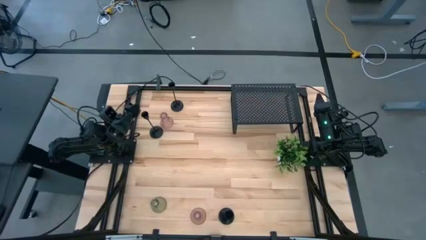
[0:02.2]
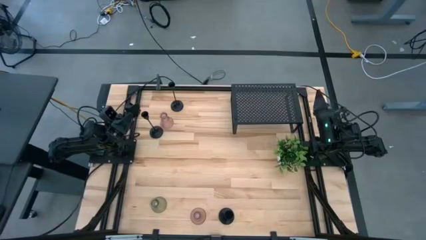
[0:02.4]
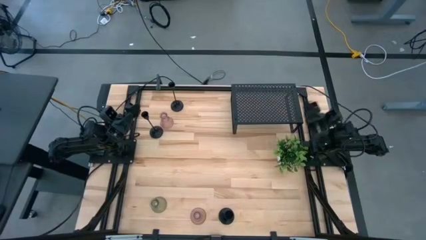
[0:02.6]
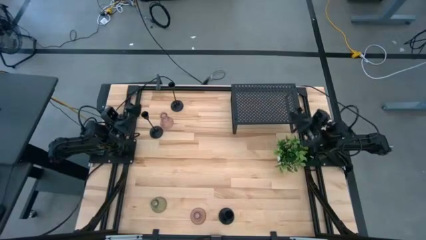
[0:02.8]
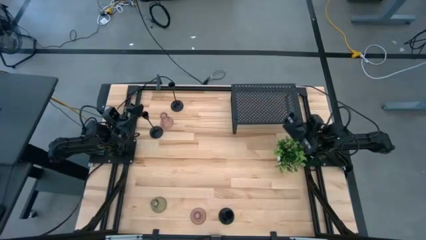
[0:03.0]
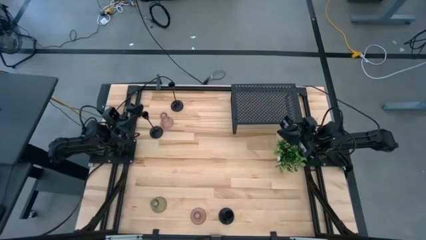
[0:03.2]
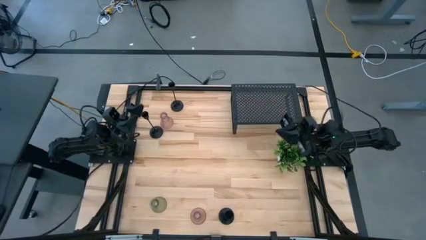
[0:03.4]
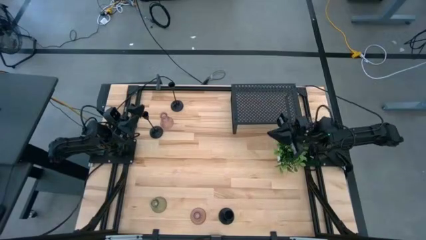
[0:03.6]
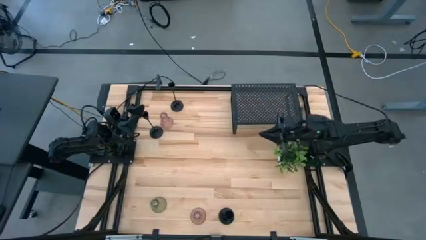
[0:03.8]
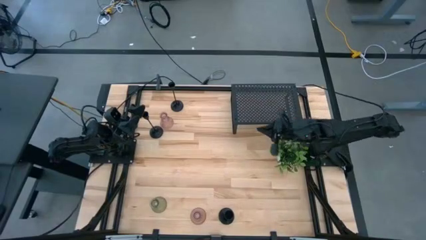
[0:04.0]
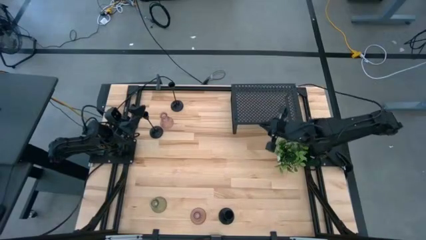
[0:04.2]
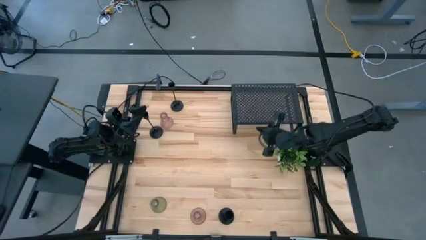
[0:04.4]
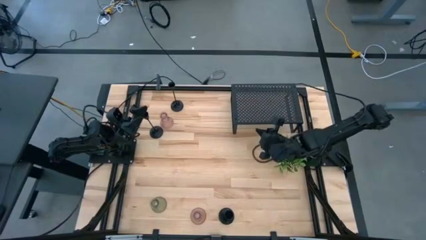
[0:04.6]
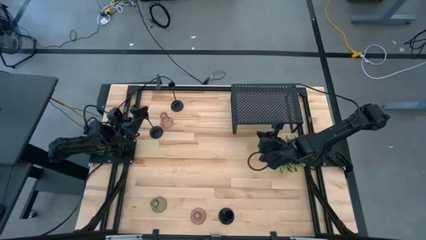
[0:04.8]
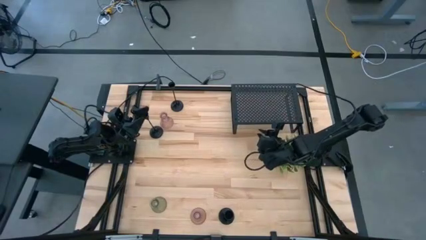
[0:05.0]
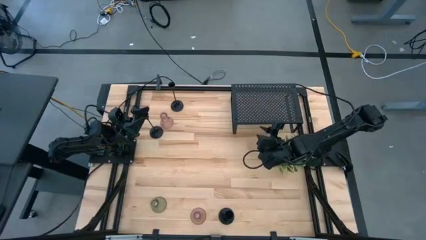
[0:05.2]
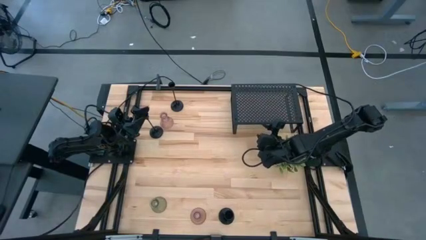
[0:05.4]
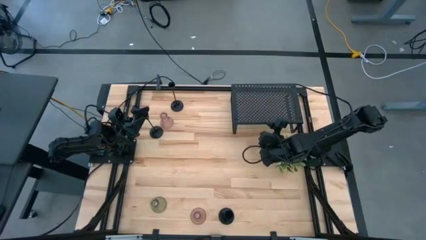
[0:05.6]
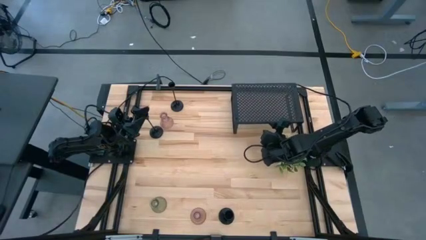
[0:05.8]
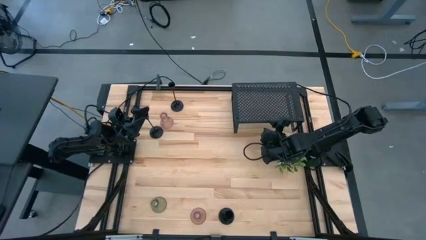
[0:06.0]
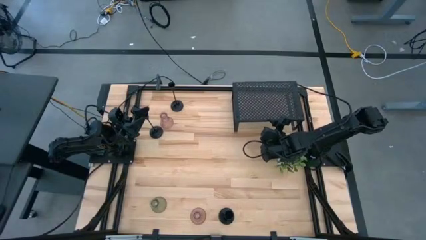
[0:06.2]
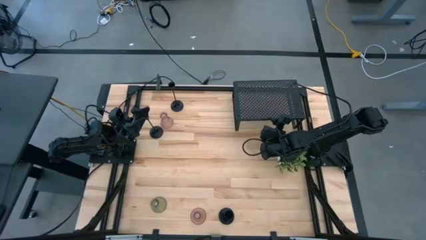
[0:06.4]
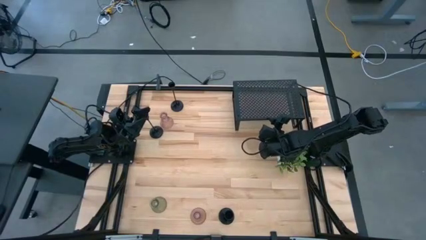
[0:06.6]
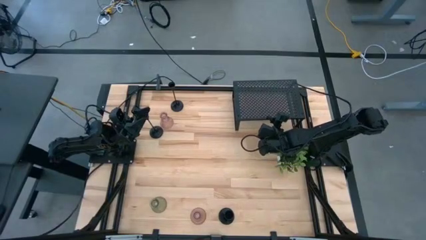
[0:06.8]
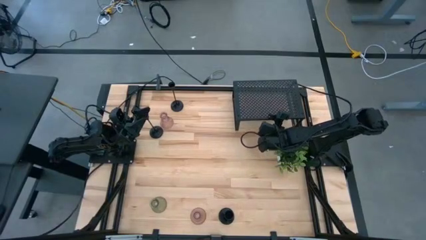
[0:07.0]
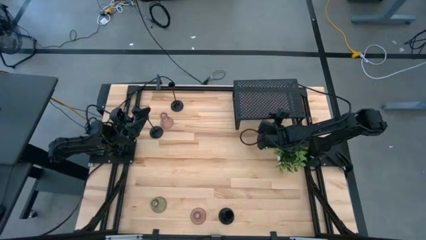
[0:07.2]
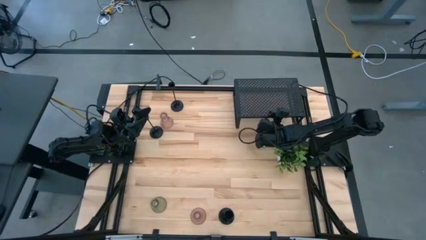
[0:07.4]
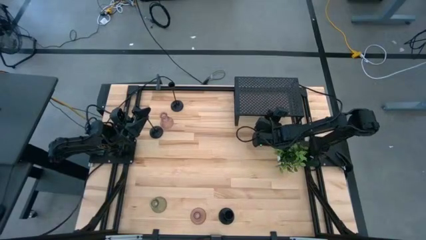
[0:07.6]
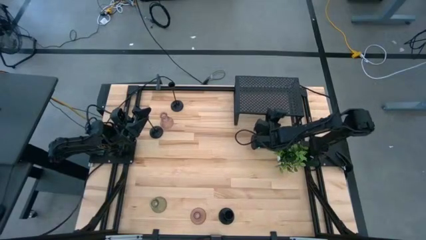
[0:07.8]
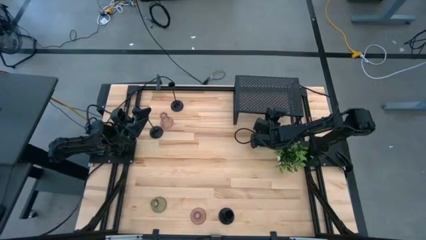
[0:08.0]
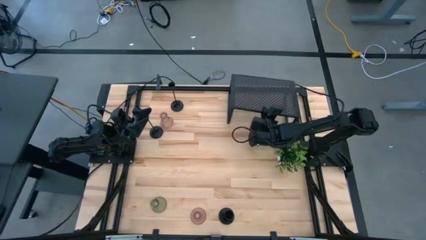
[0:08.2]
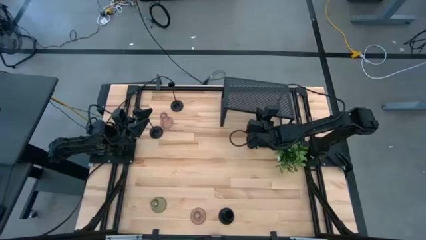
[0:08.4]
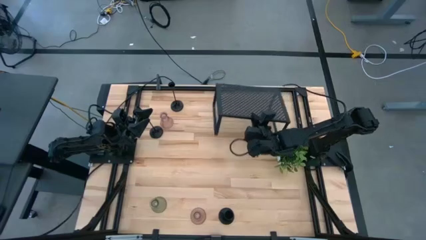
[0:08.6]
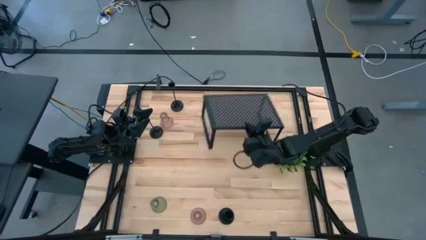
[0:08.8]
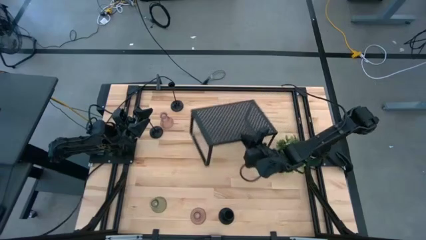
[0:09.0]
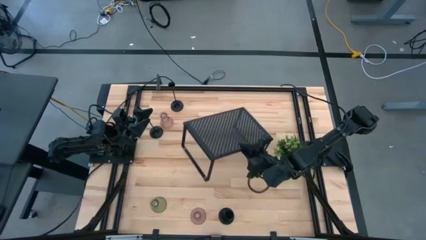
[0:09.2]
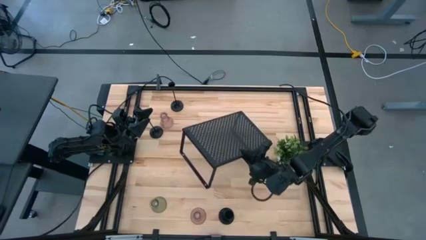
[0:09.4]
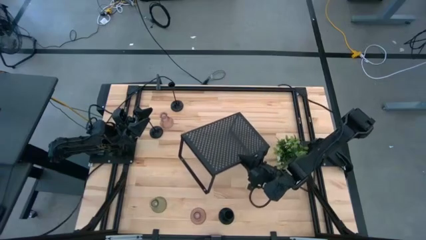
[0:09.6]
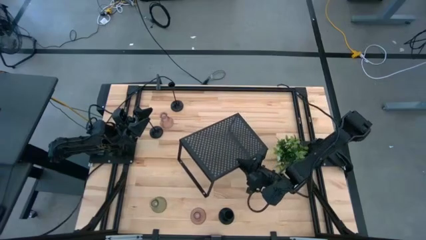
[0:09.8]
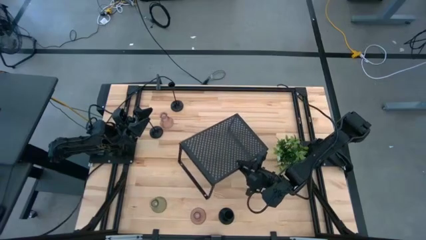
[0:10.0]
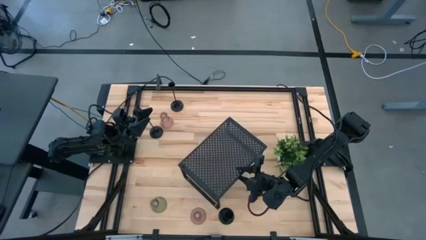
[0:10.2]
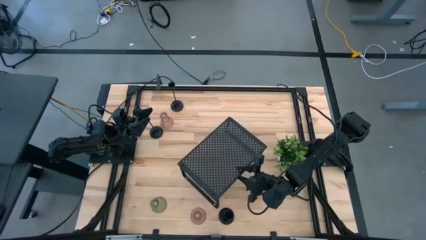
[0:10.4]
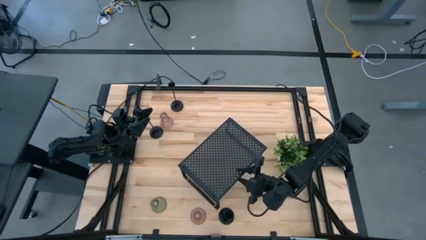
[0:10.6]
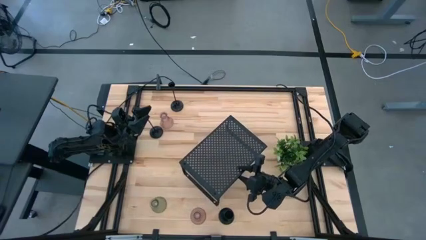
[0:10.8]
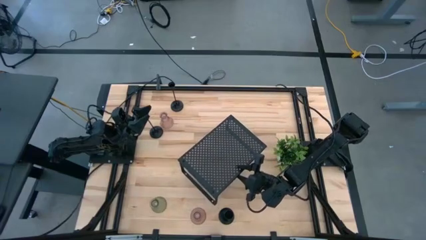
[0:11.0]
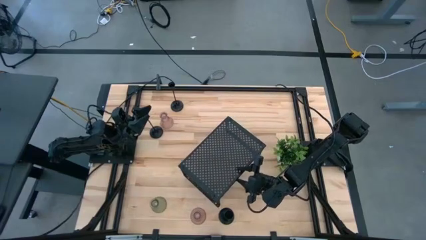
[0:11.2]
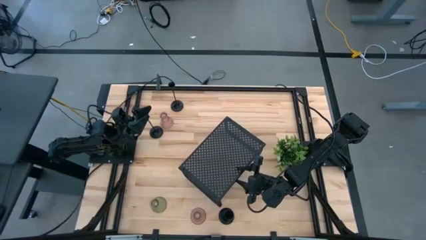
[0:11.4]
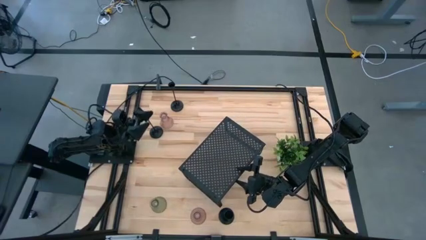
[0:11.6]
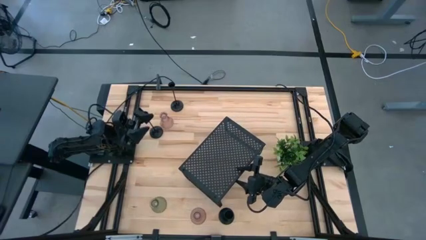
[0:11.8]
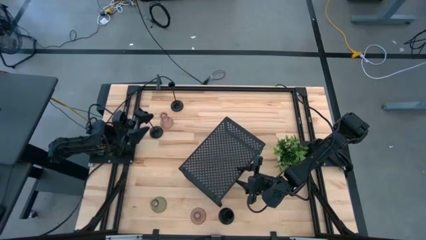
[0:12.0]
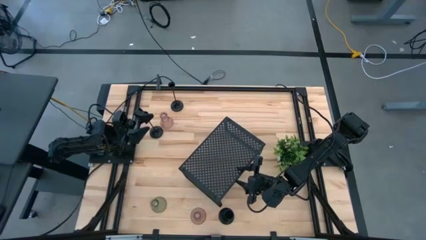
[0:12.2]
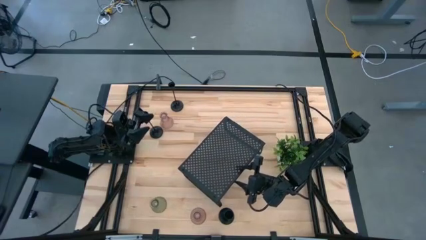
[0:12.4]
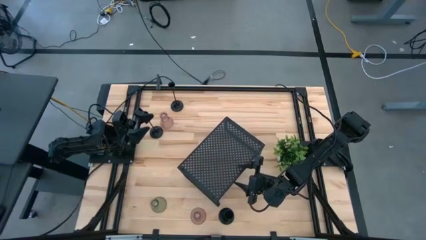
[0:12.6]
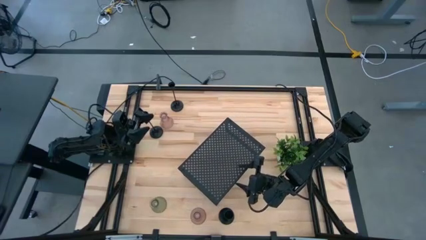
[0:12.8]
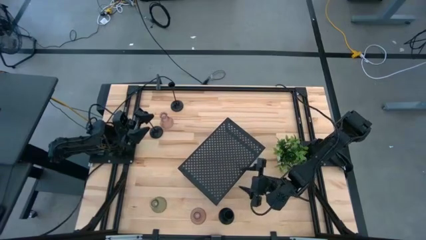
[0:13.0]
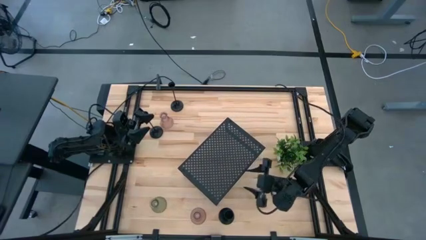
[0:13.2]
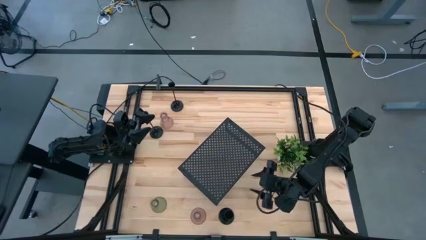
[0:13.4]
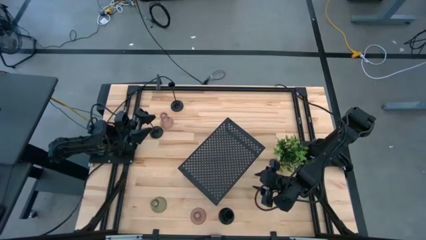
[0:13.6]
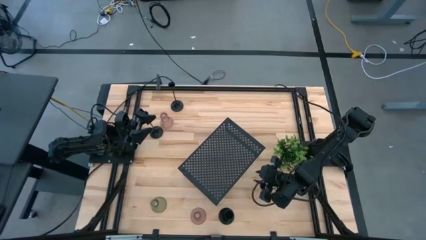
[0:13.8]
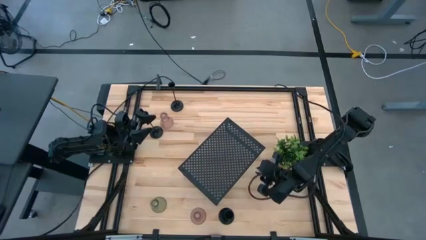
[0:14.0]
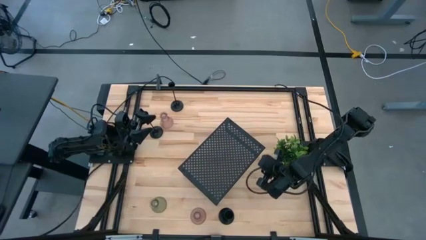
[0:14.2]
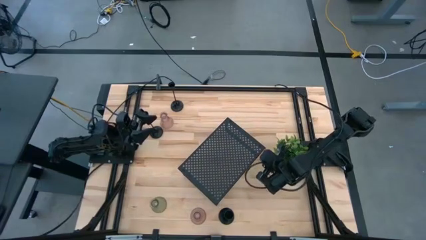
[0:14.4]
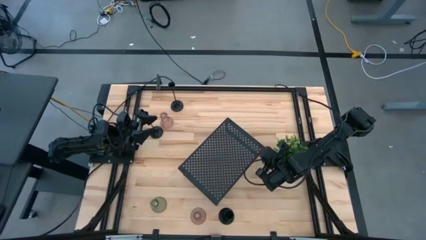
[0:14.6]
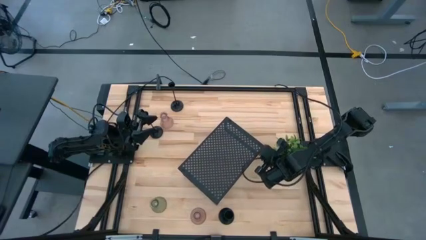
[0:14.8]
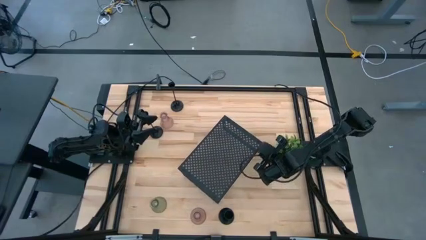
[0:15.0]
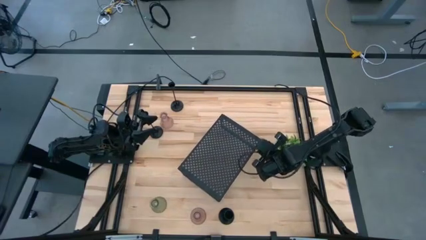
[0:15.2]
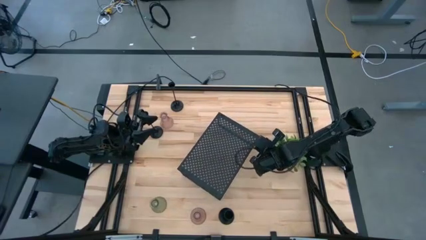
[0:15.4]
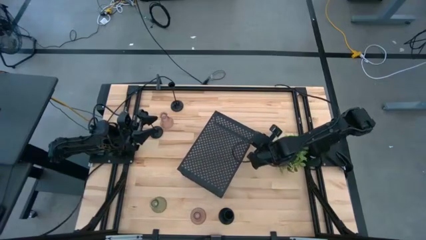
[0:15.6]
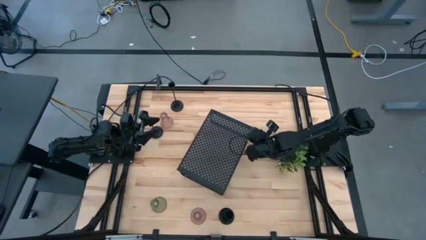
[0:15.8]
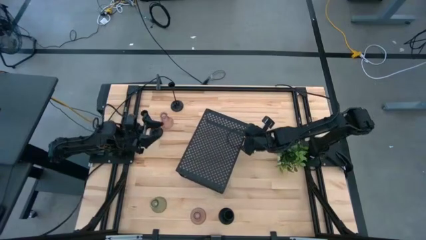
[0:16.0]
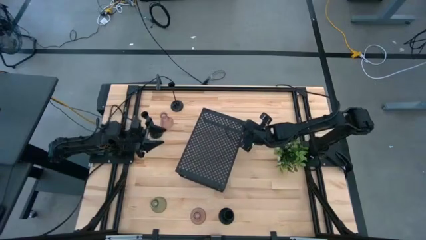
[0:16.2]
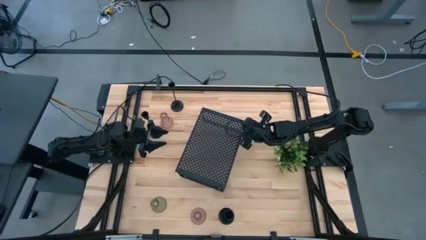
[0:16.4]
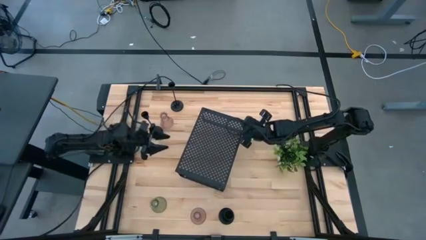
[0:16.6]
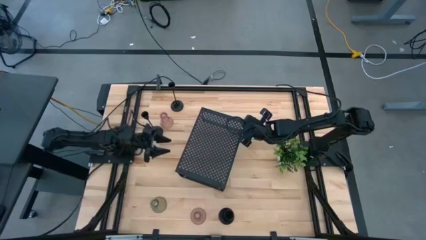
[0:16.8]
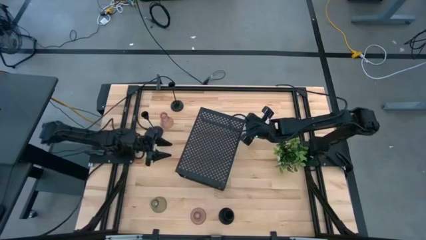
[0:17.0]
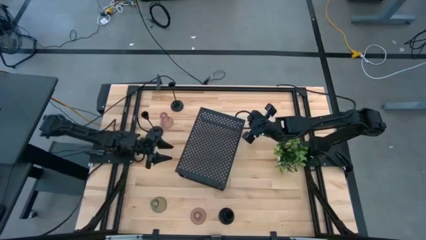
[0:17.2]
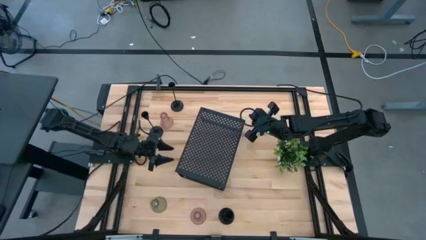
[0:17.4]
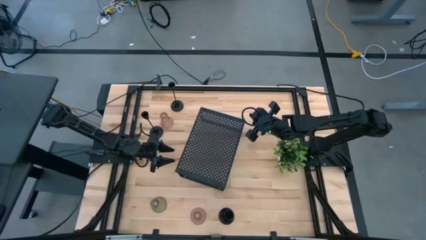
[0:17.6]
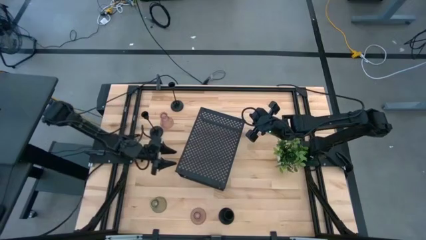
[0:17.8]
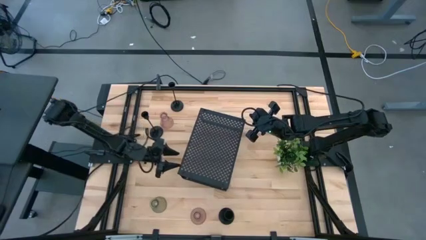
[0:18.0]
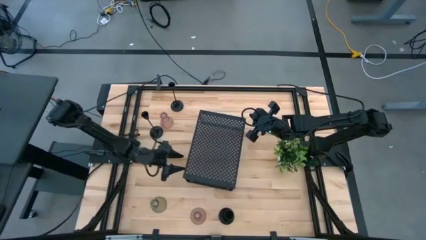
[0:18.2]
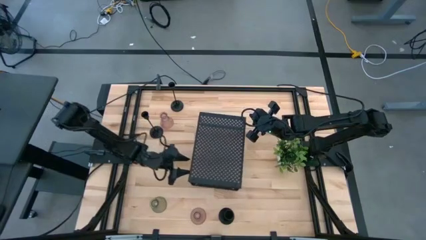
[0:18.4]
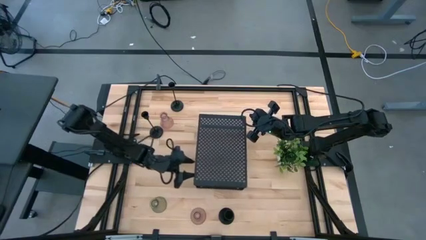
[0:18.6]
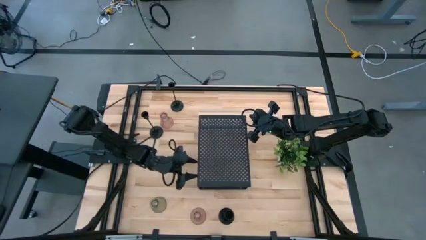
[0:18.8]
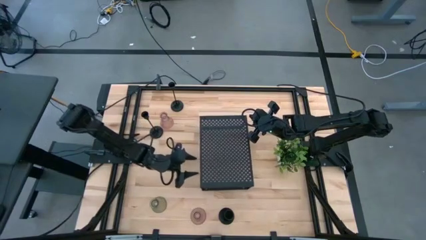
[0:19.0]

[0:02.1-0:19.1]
Task: Pick & Place candle stick holders
Move the shelf to the middle of the table
